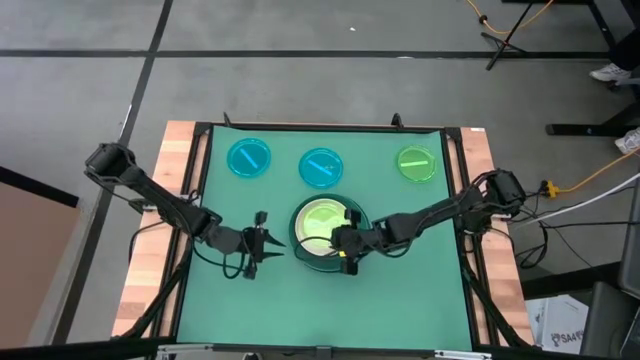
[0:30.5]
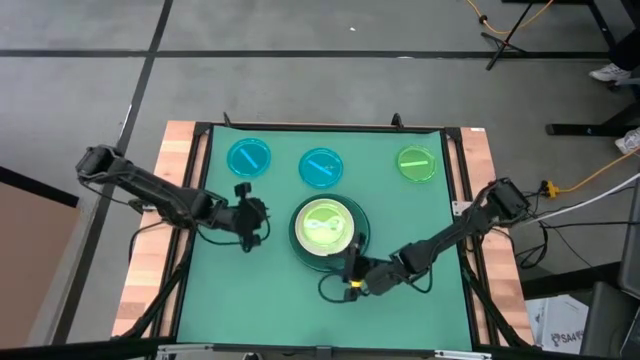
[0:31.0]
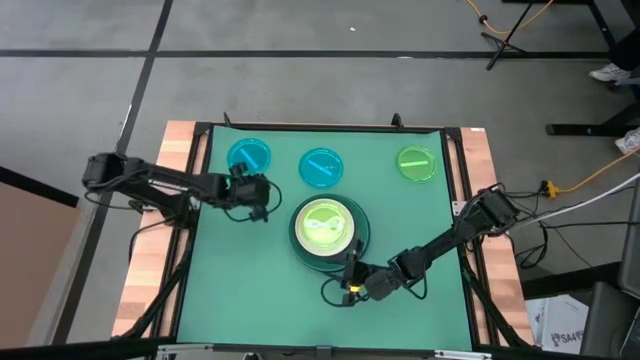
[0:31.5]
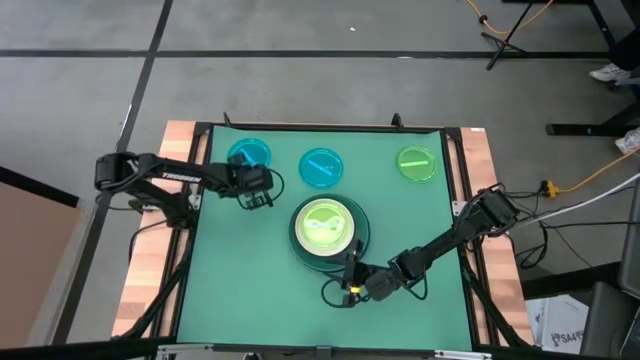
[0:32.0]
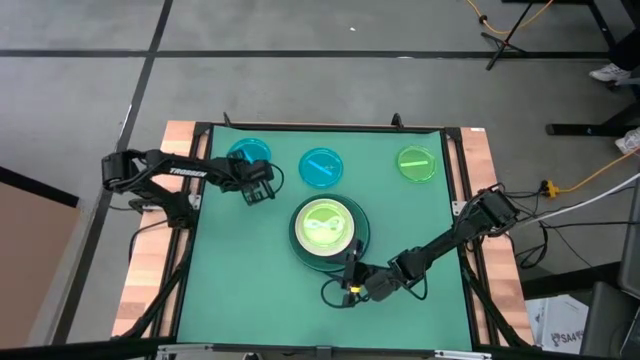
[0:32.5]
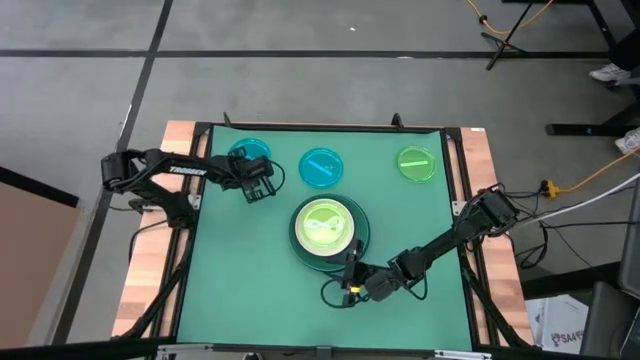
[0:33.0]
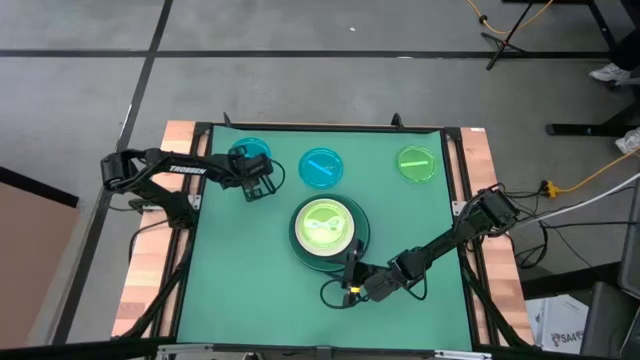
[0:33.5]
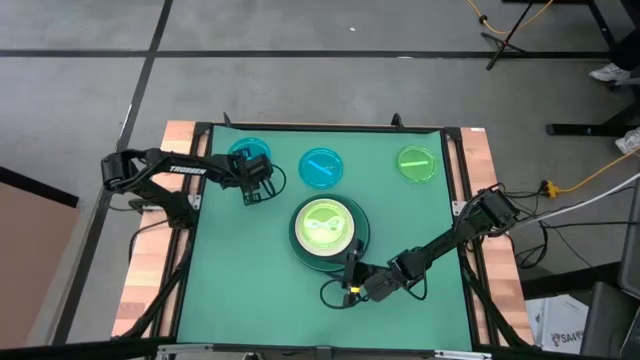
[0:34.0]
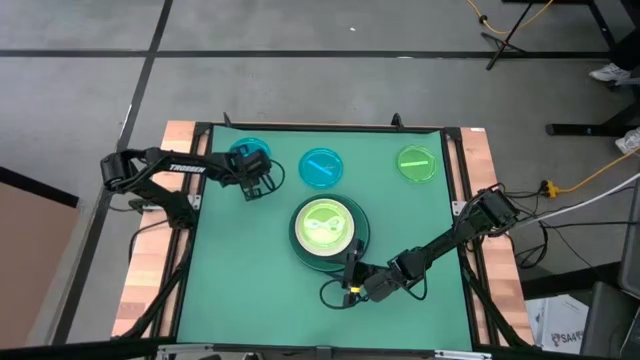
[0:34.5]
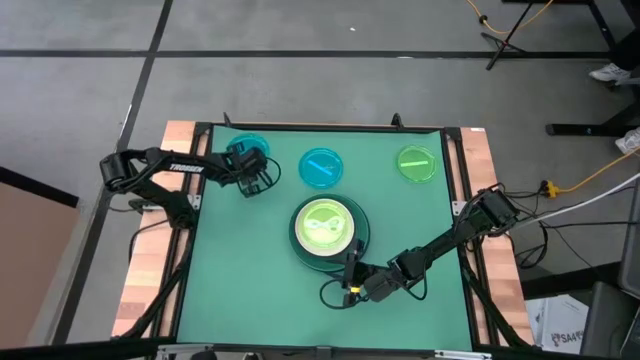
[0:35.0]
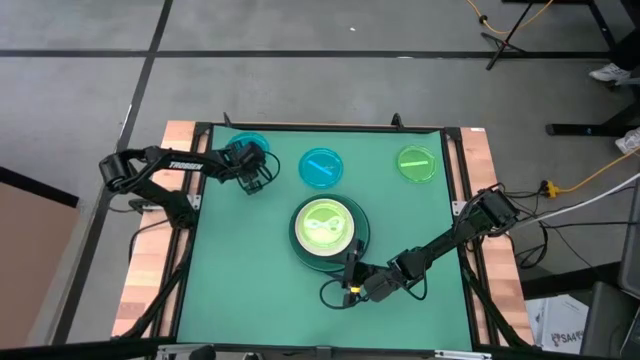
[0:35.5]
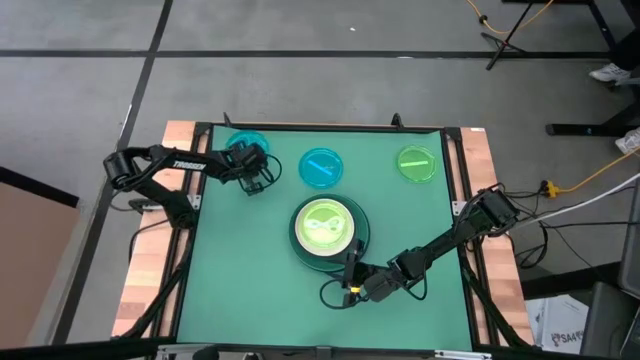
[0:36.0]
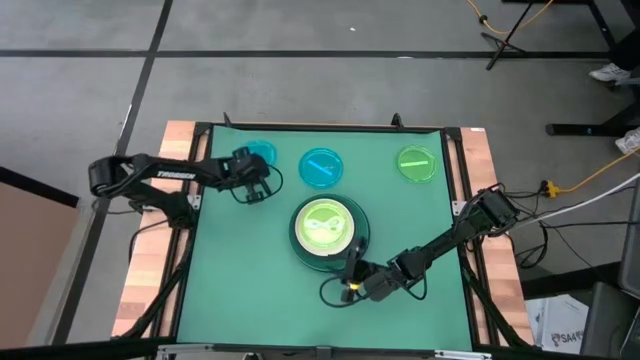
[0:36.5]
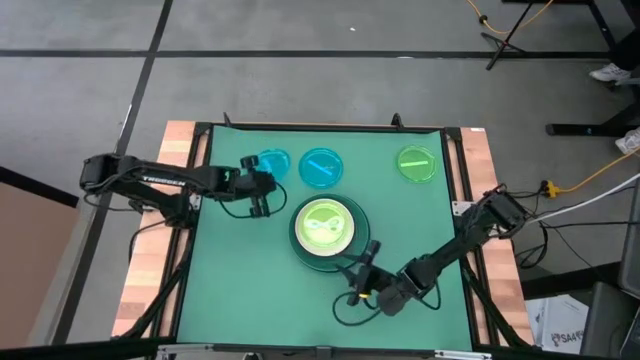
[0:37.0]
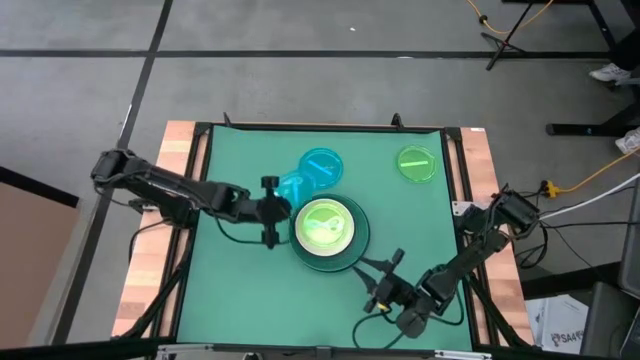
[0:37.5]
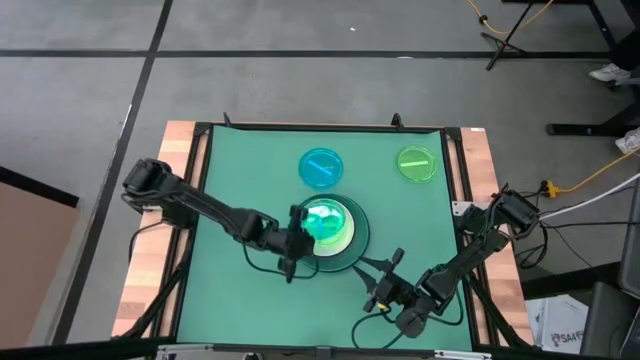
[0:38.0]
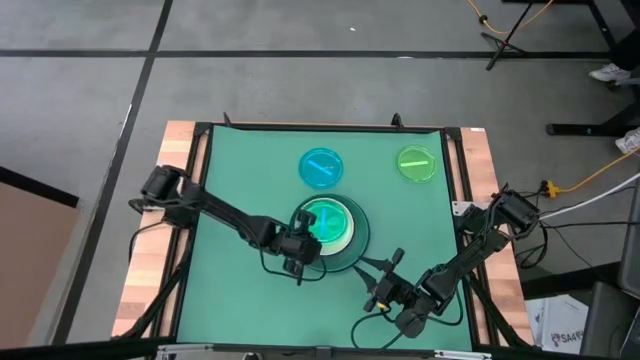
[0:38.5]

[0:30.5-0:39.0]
Task: Stack plastic plates
Stack the left light blue plate on top of the light green plate

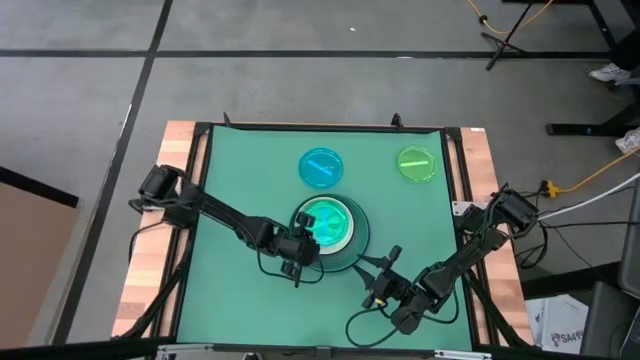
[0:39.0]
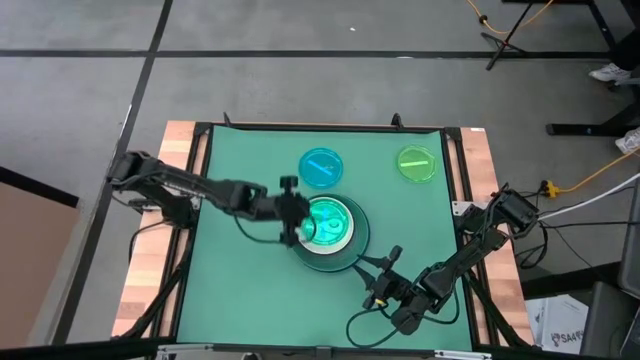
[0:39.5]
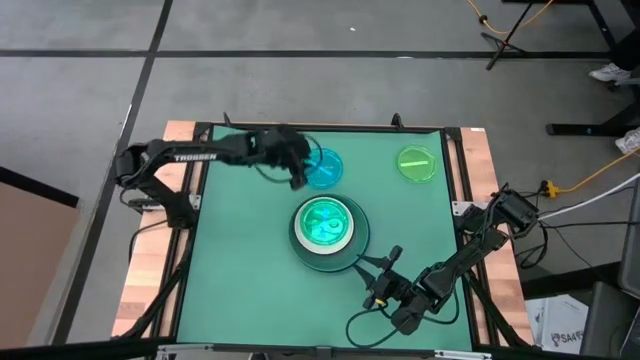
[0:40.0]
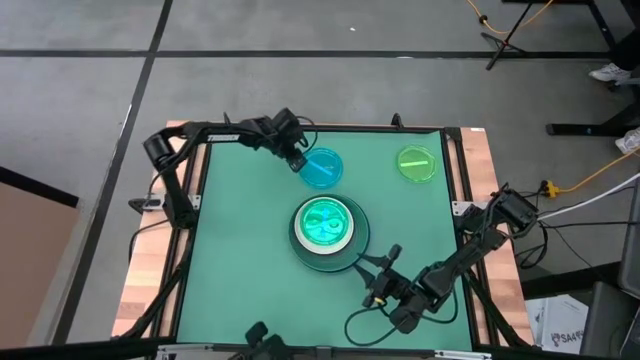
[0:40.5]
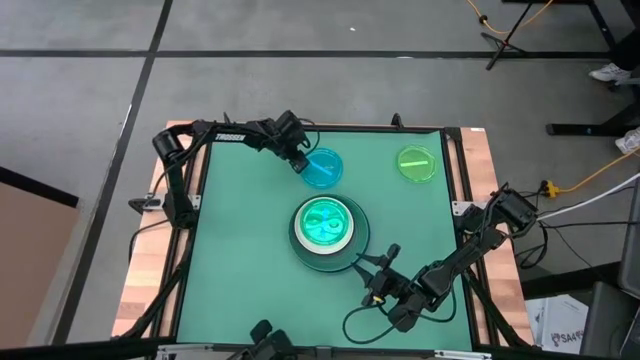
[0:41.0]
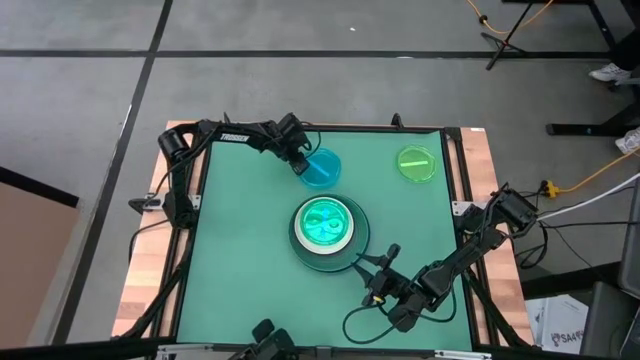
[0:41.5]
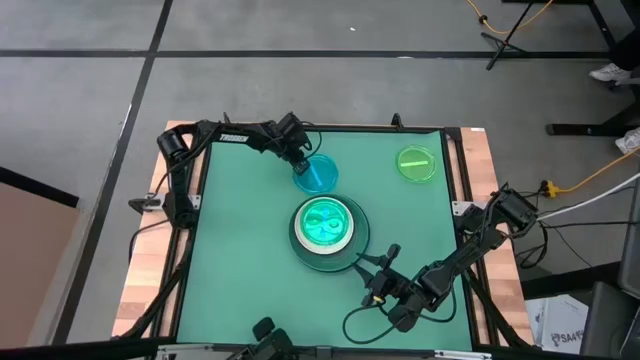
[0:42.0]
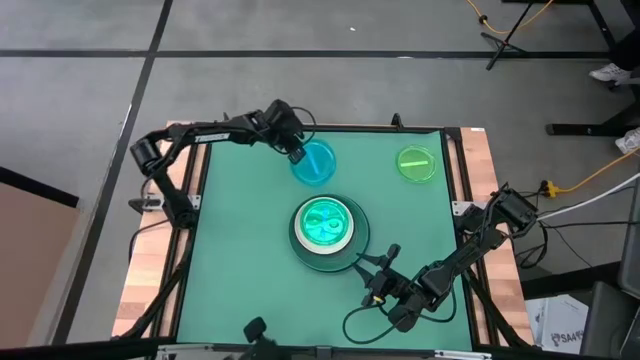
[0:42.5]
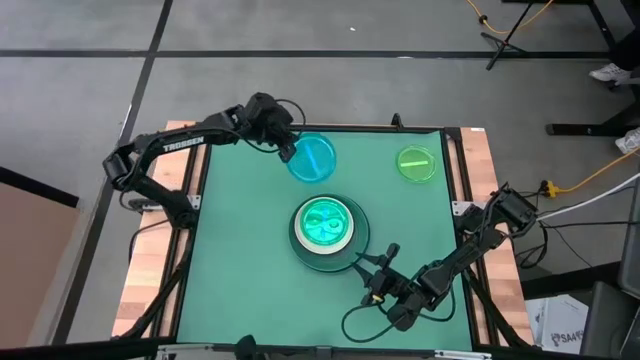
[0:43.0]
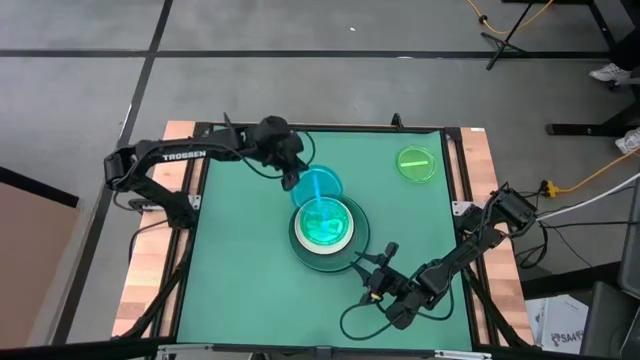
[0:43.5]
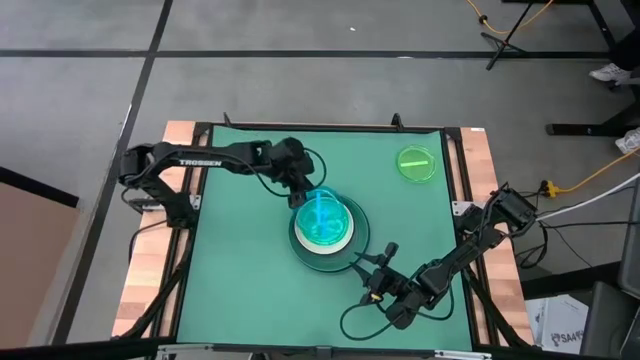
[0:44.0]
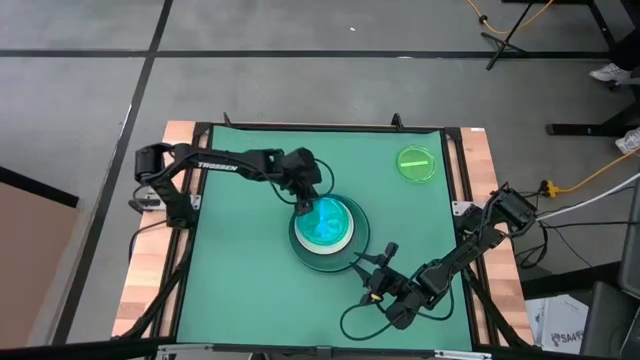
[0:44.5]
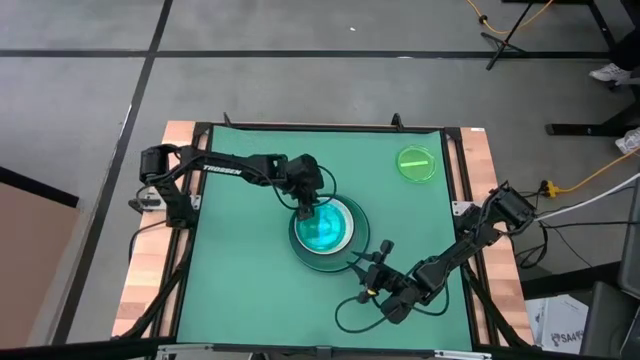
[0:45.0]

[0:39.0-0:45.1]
Stack the light blue plate on top of the light blue plate

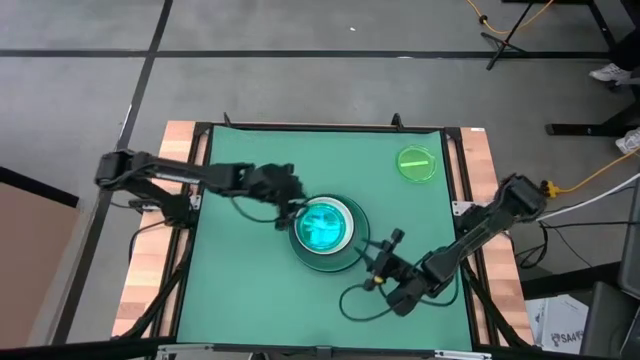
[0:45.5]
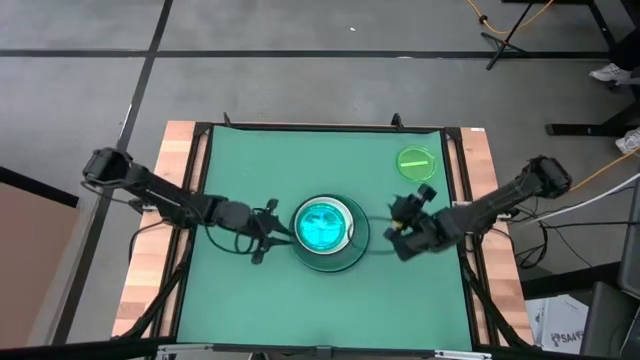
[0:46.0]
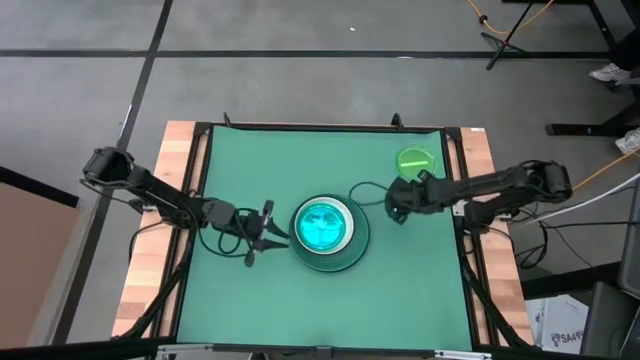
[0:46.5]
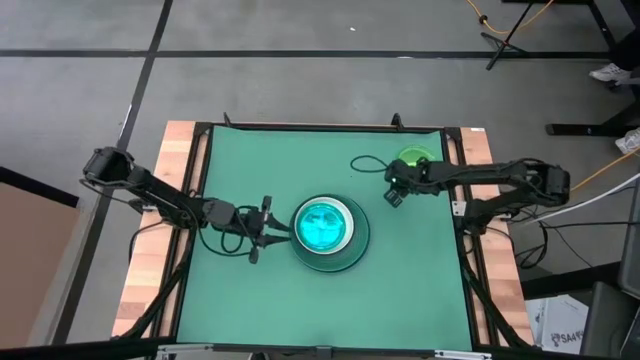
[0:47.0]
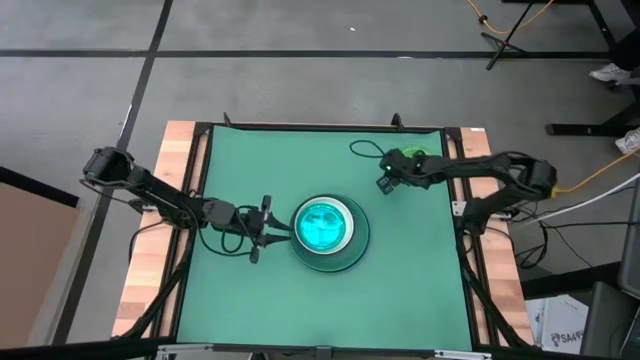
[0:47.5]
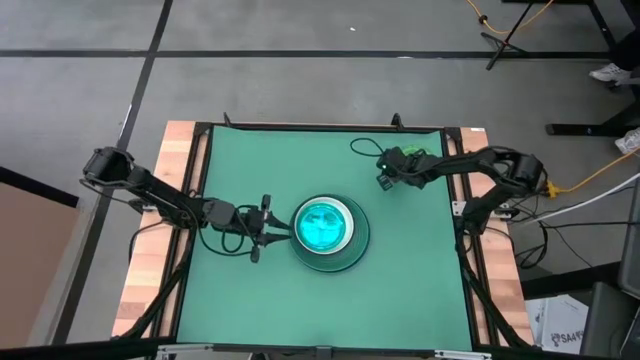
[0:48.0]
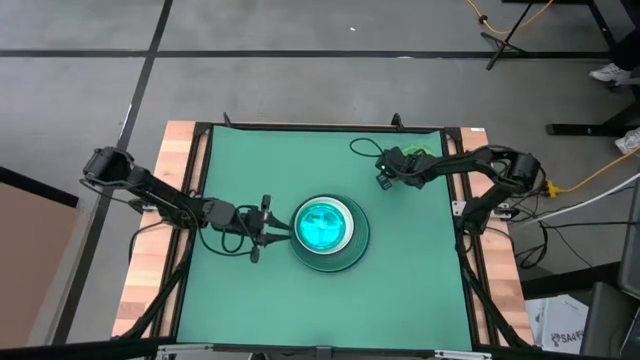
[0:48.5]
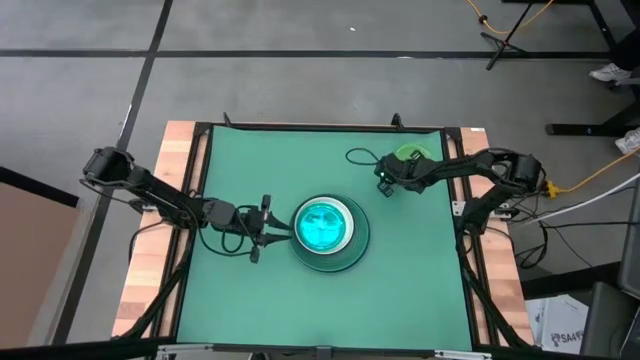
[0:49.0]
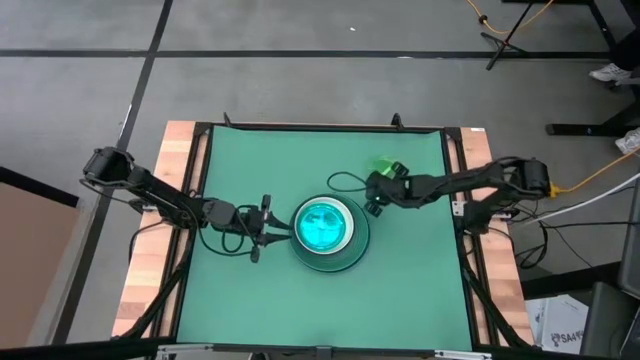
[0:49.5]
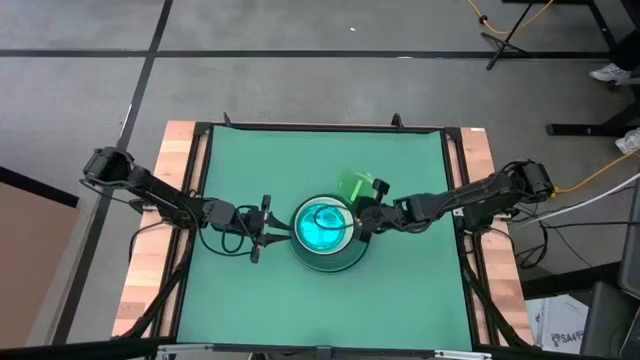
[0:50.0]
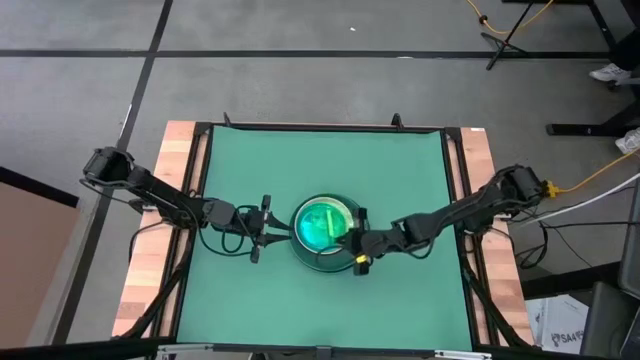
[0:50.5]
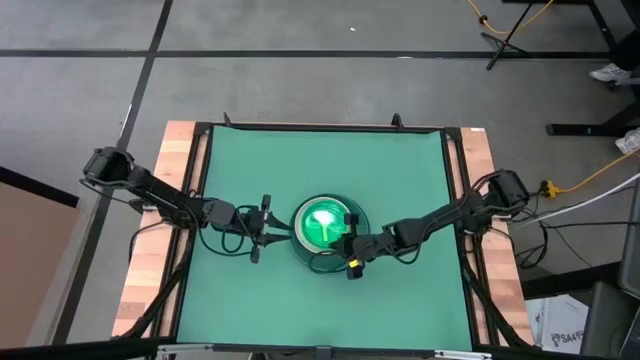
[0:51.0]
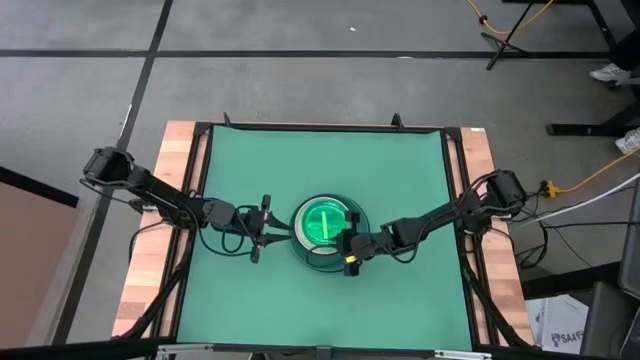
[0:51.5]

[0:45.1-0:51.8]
Stack the light green plate on top of the light blue plate
